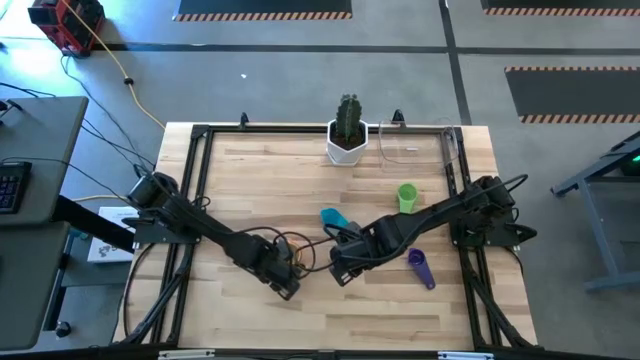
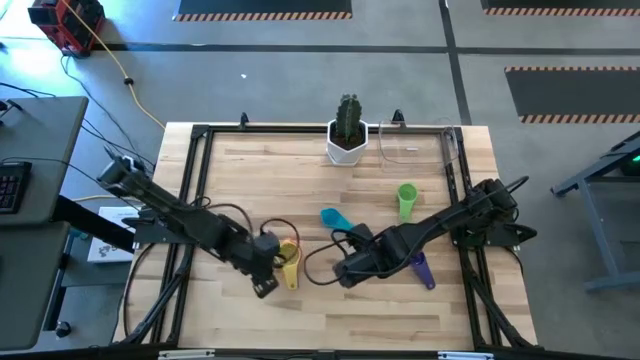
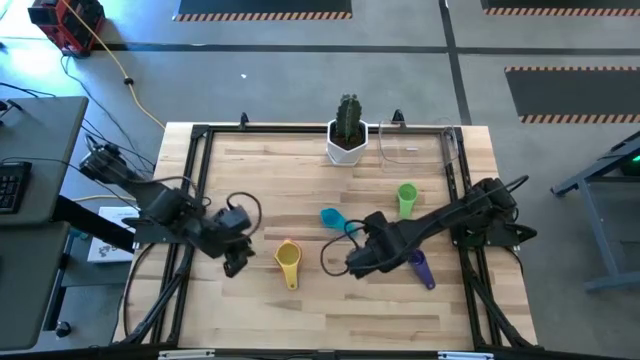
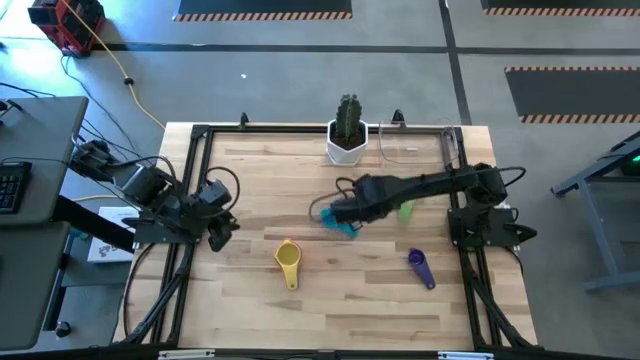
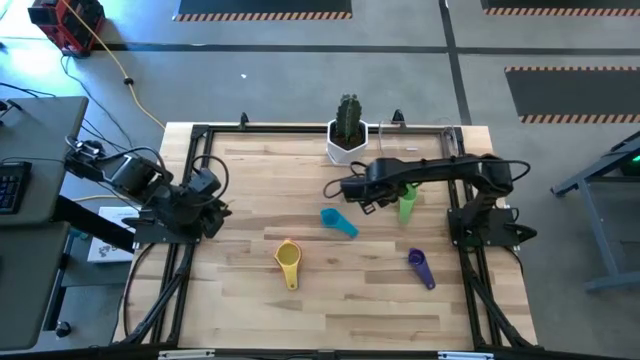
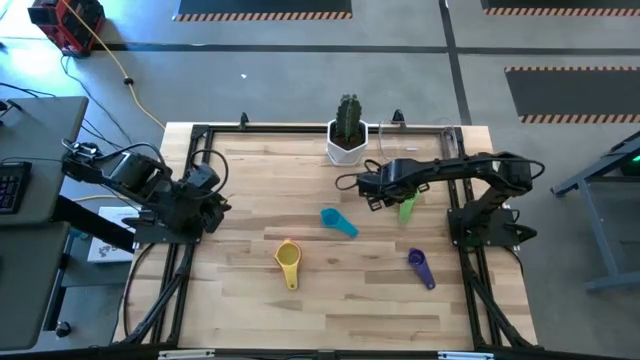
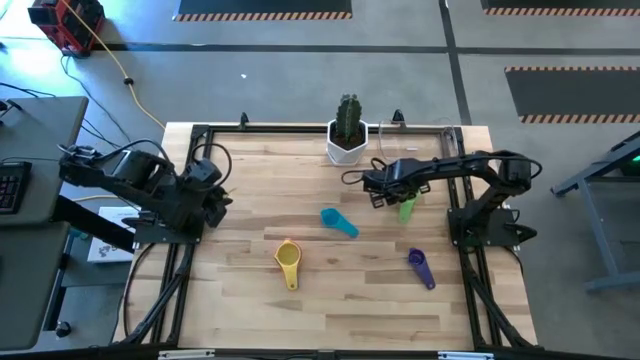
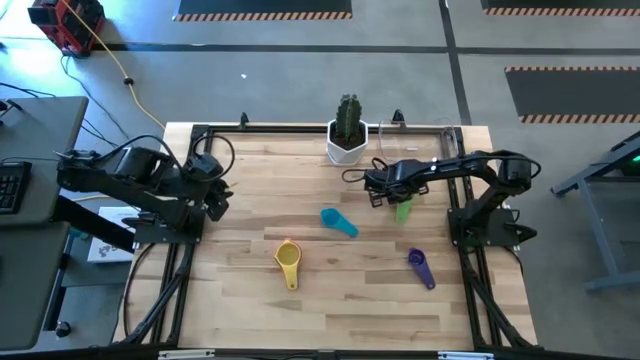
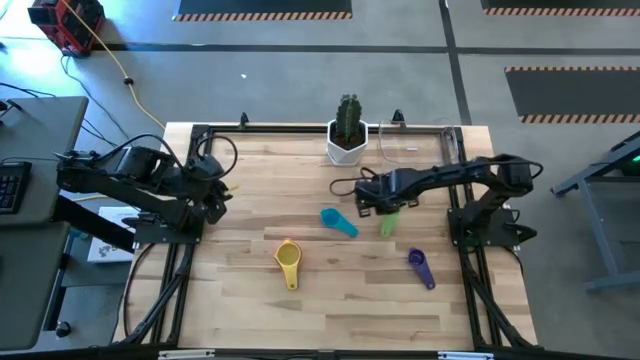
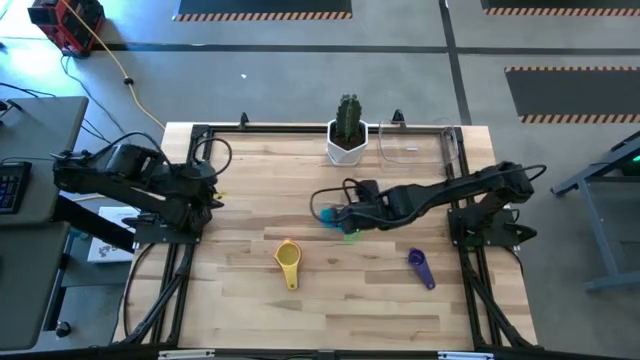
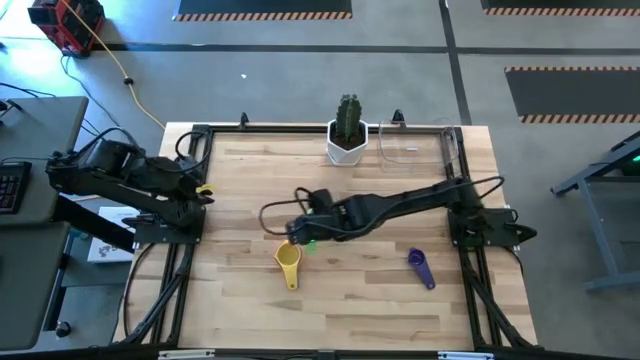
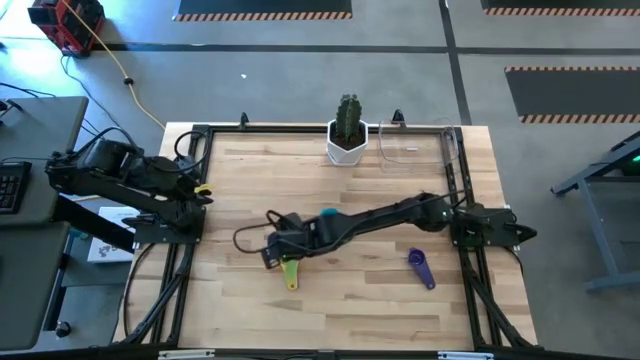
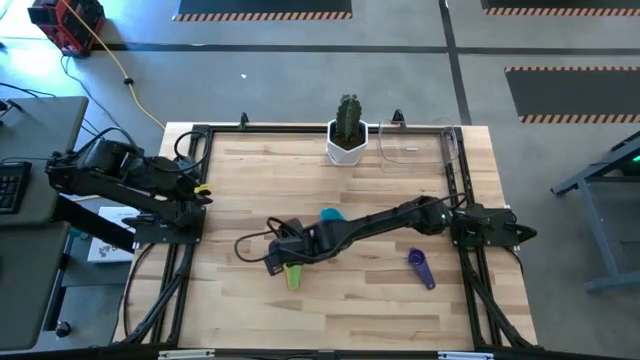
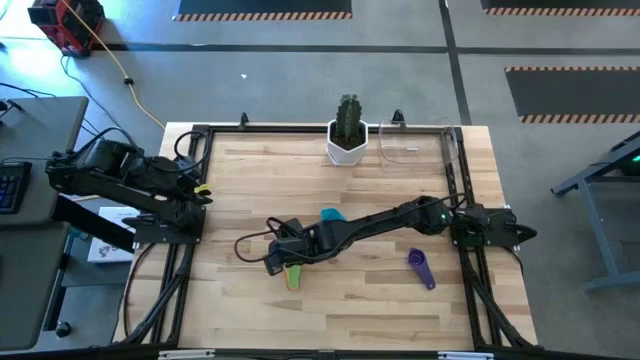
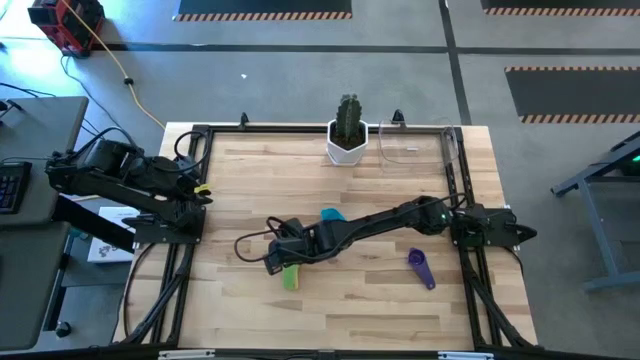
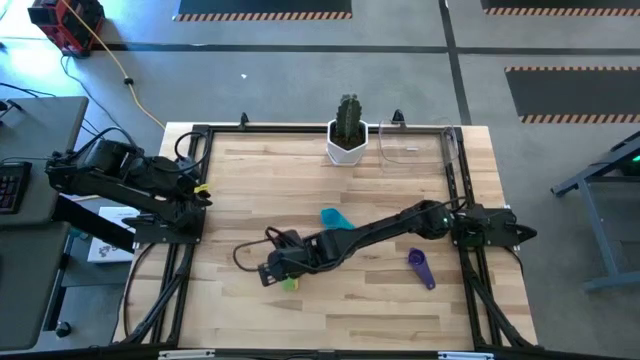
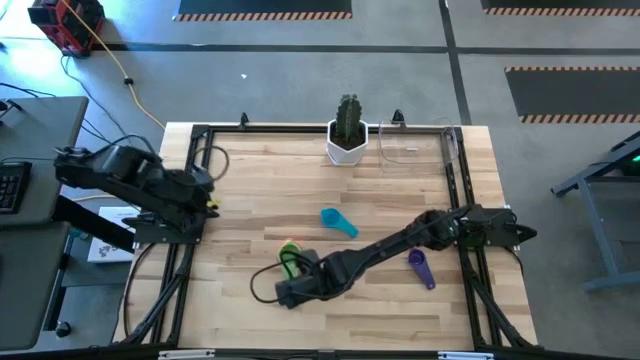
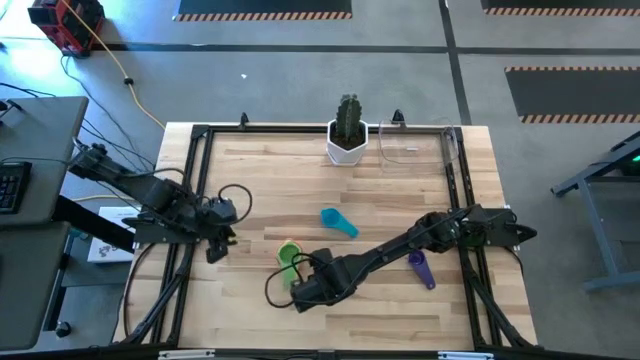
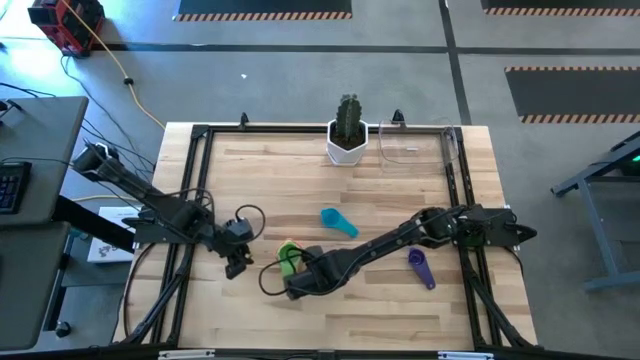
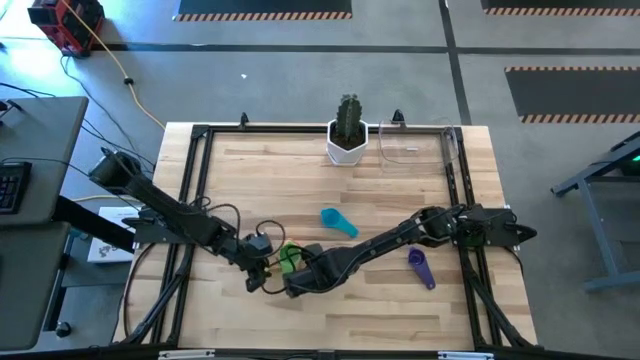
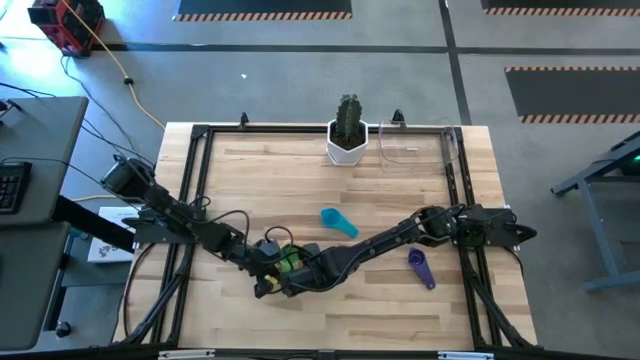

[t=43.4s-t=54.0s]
Task: Nest measuring cups in basket
Put the green measuring cup on top of the yellow measuring cup

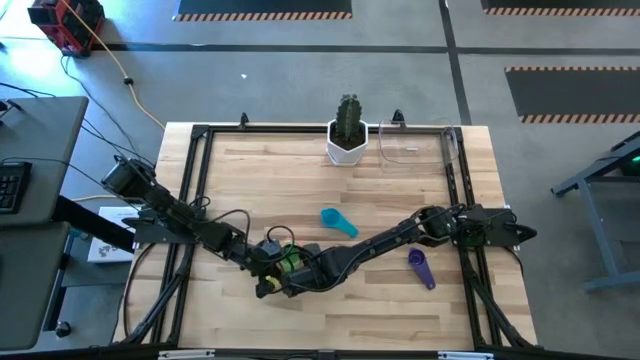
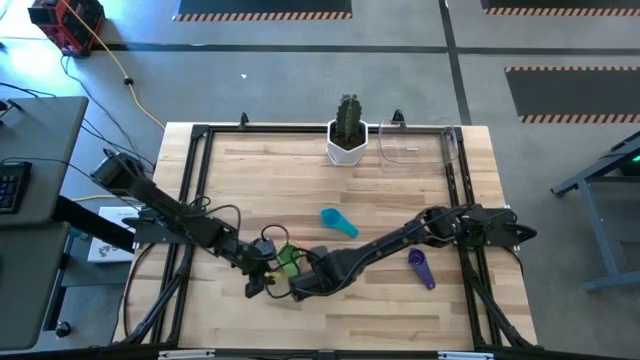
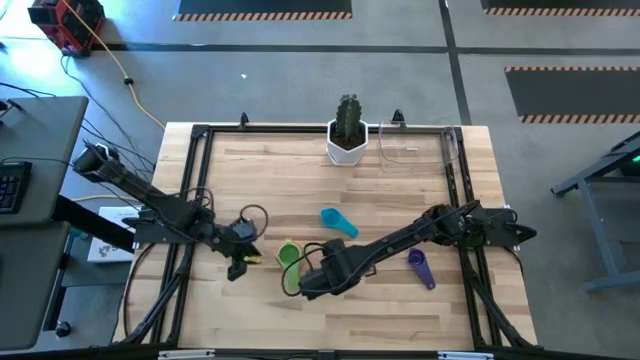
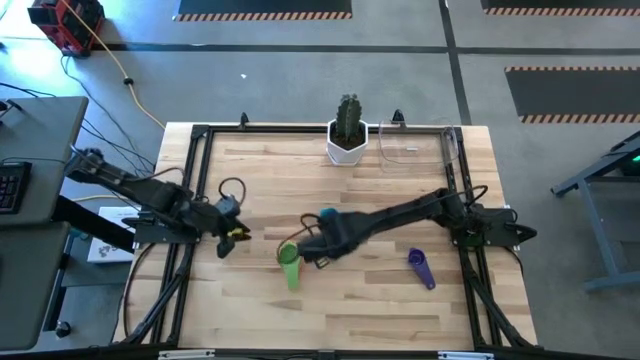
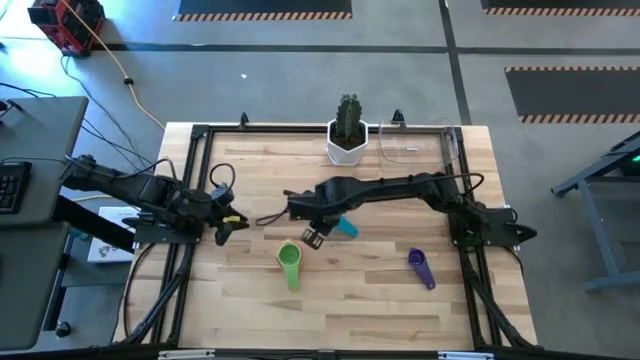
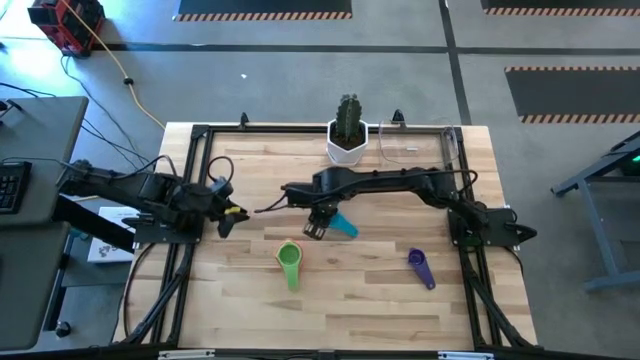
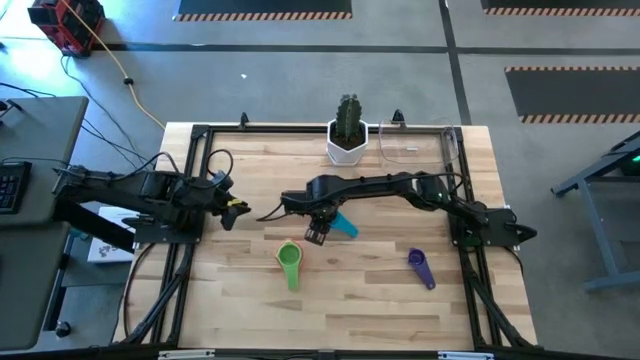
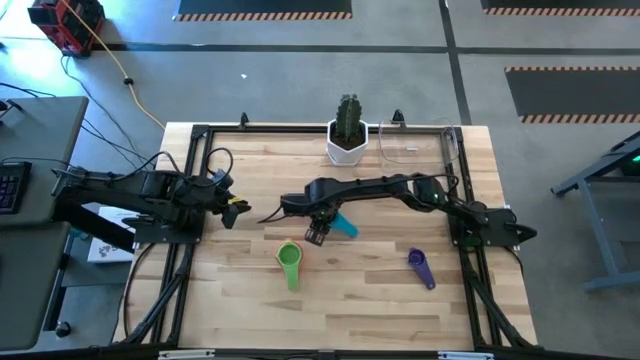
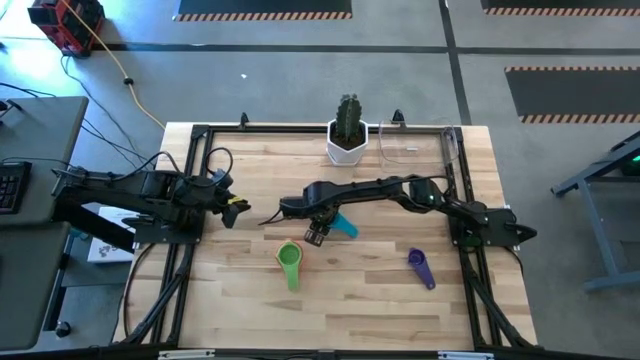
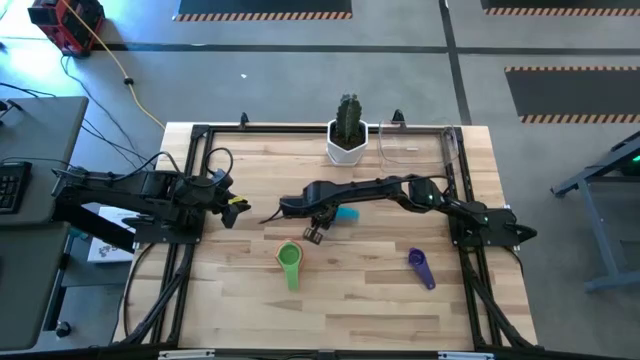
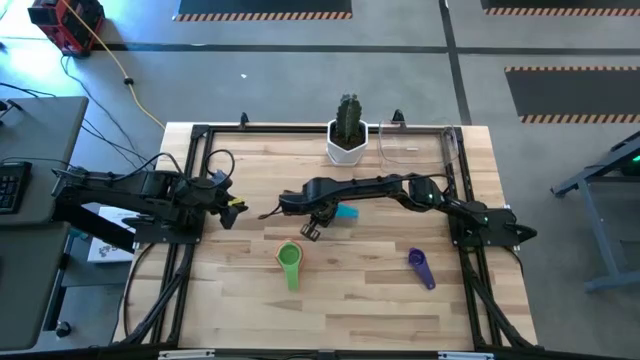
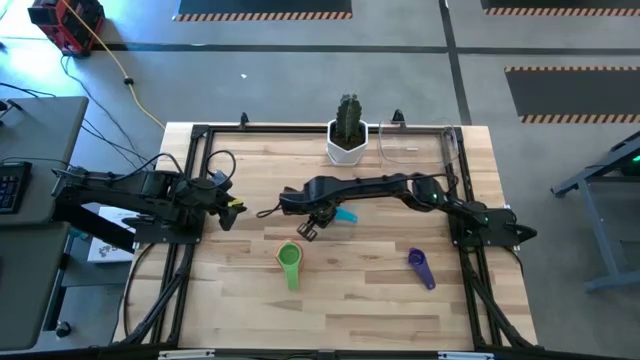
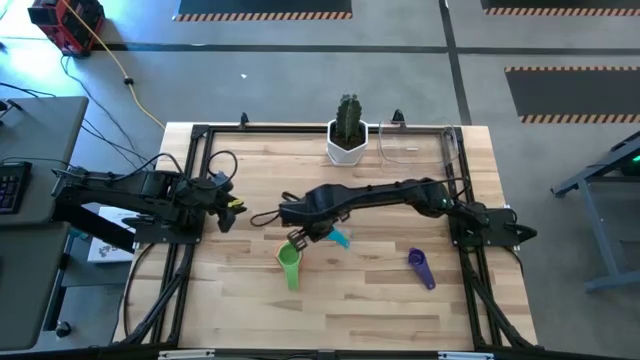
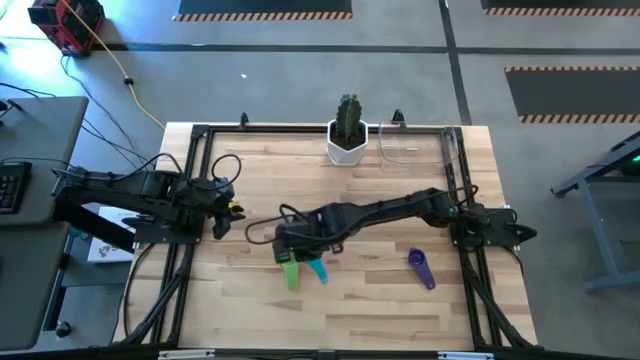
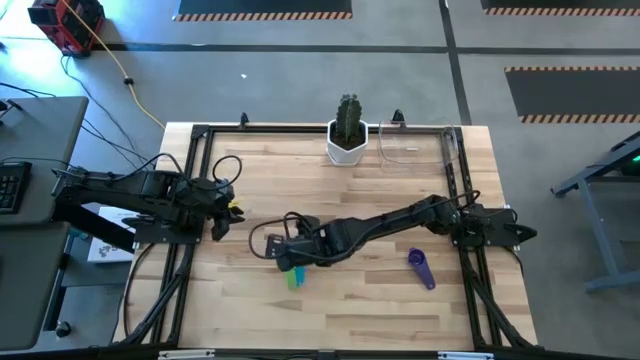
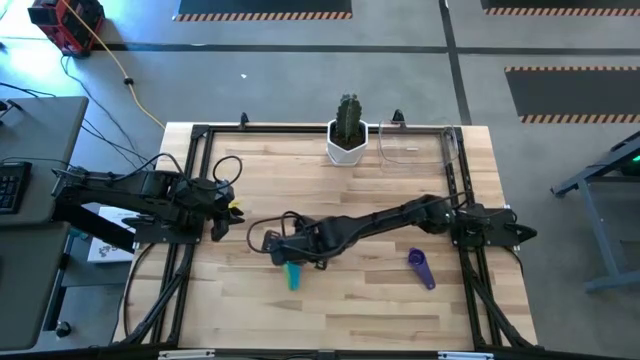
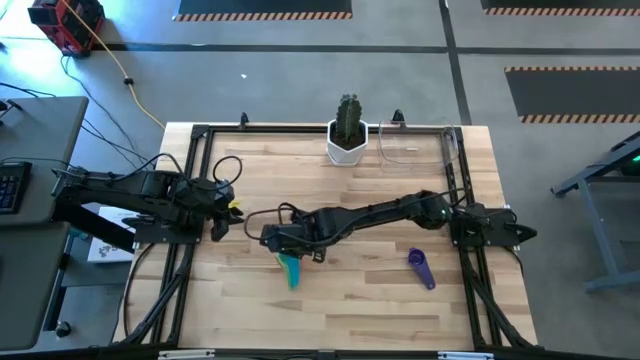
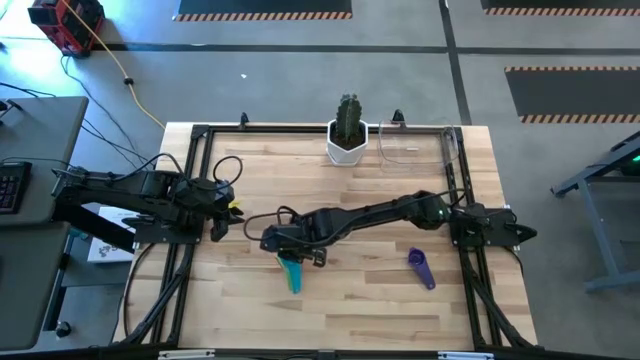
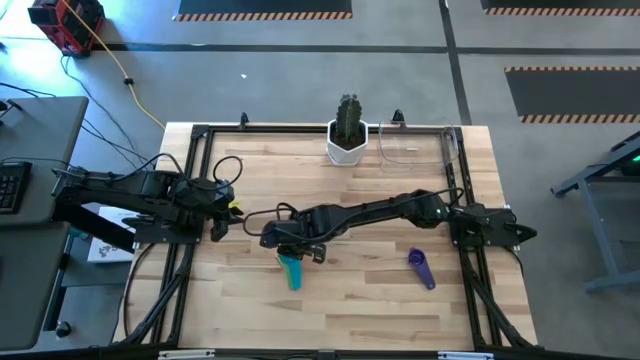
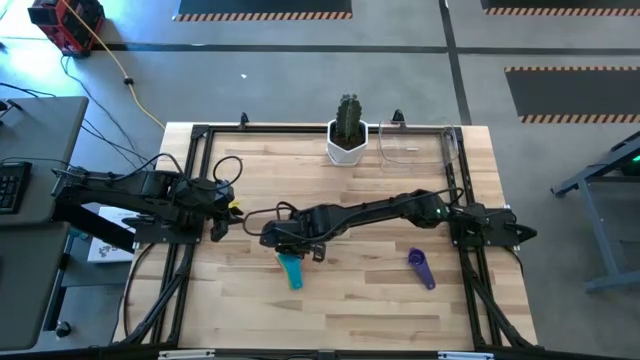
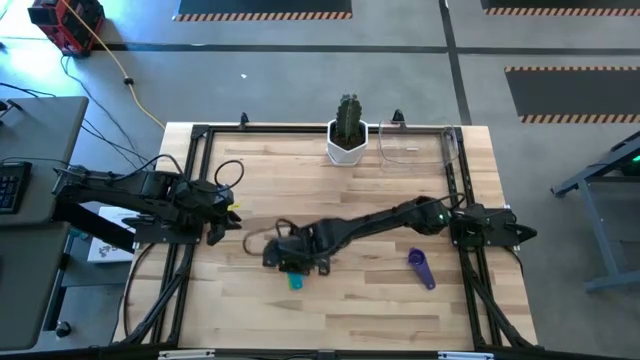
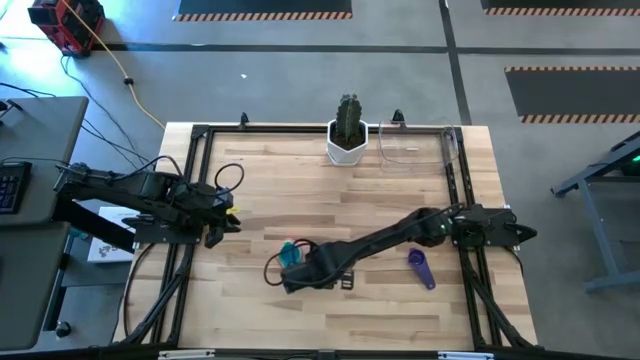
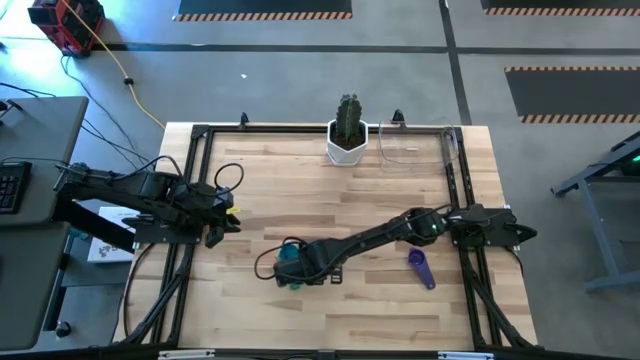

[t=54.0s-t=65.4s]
Put the light blue measuring cup on top of the green measuring cup
